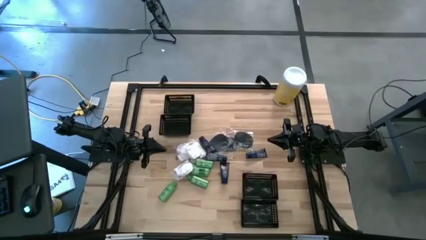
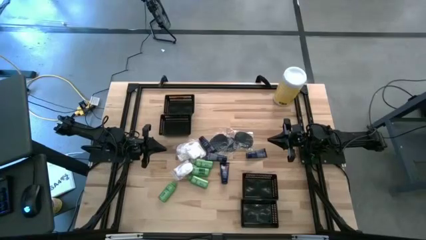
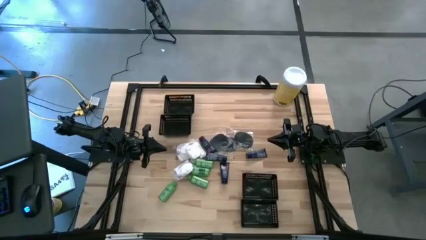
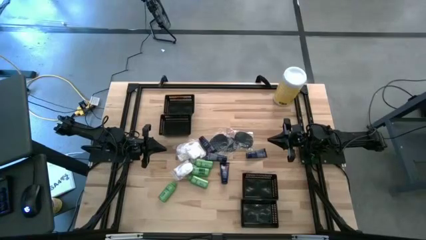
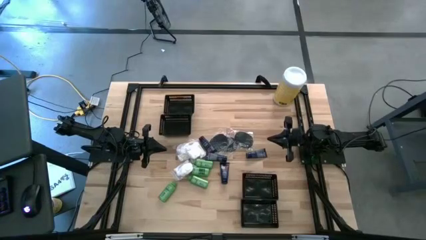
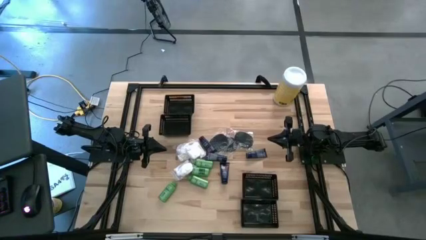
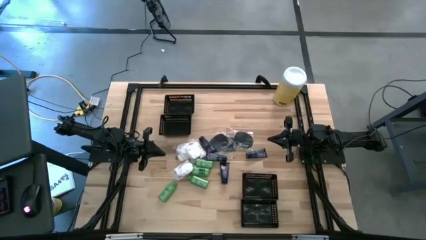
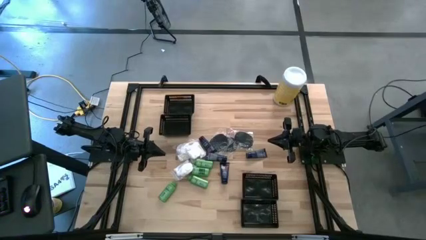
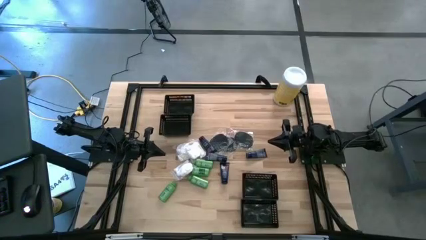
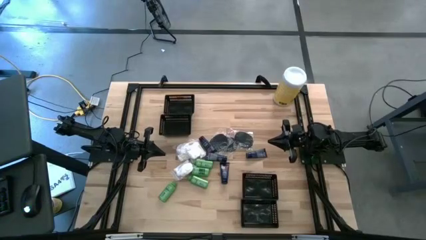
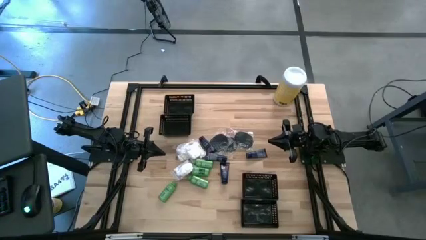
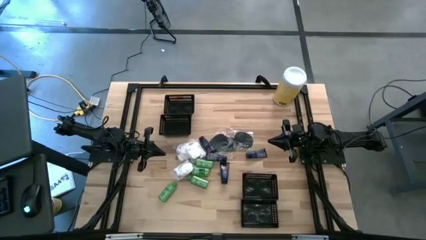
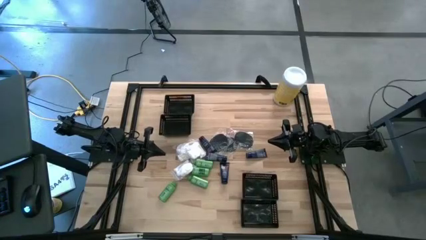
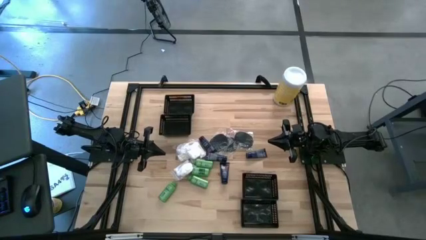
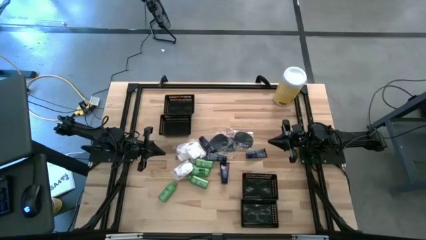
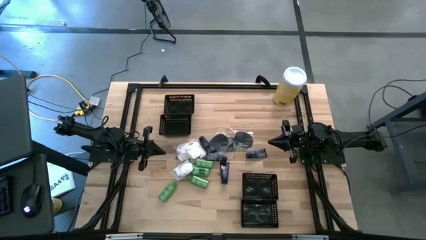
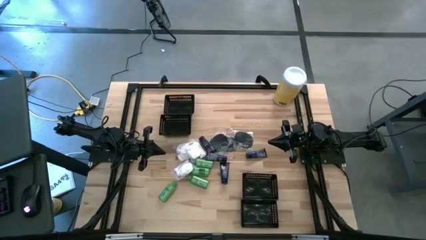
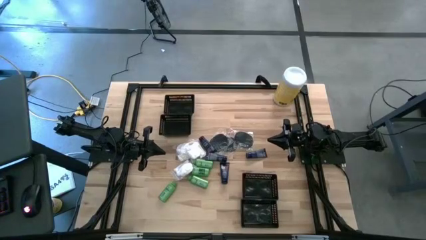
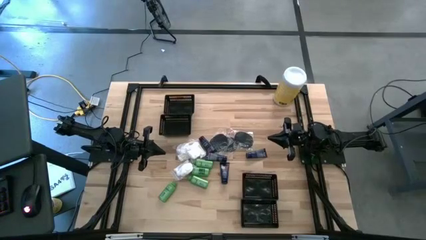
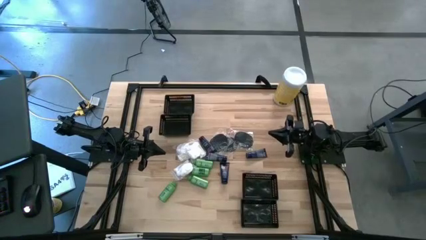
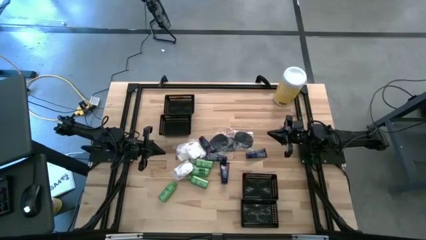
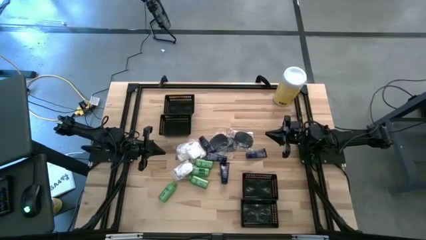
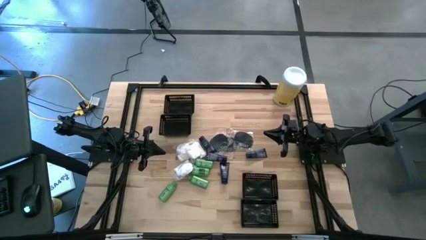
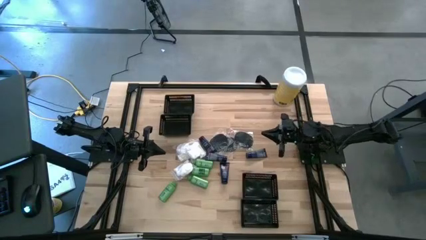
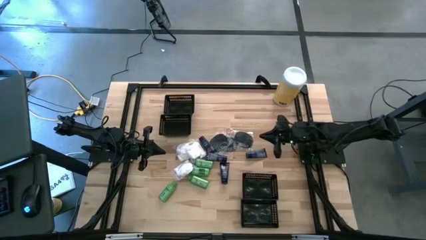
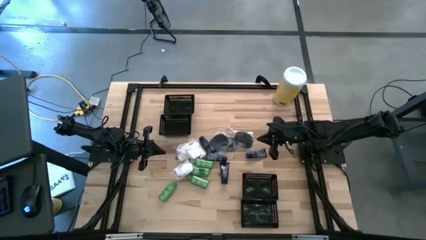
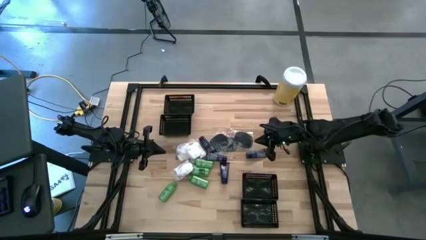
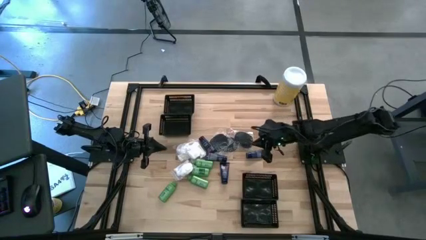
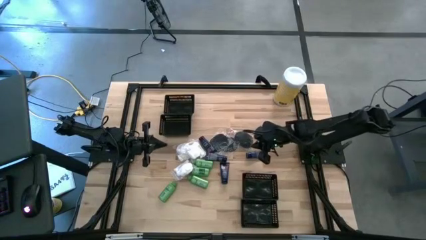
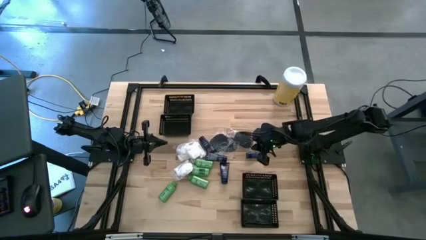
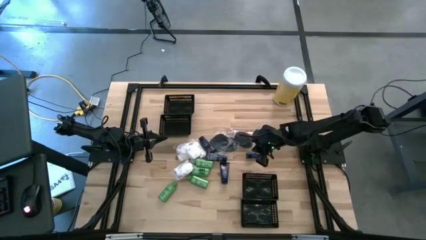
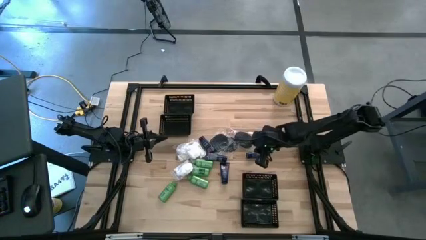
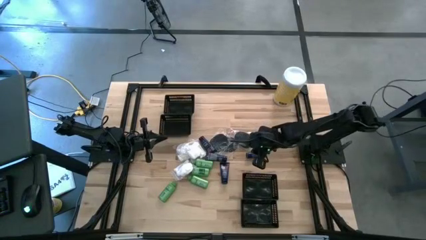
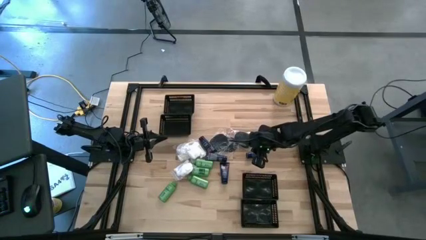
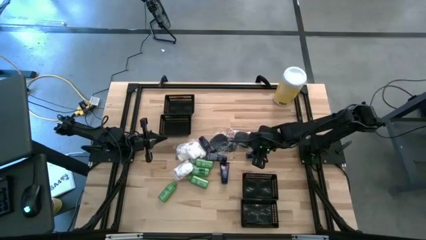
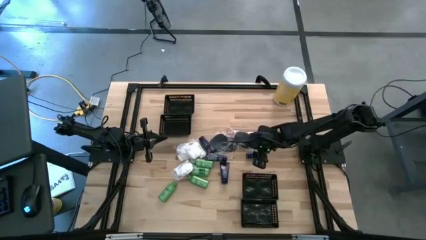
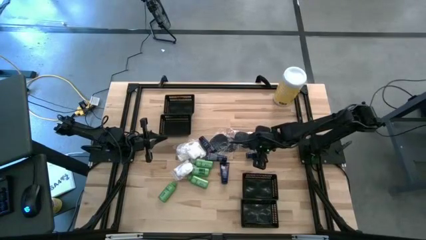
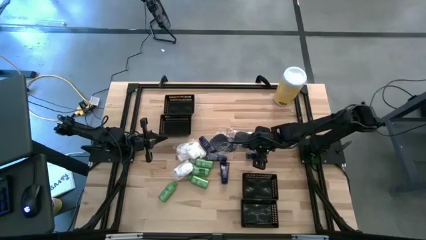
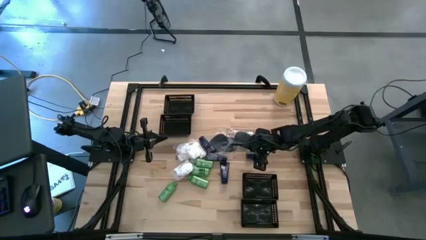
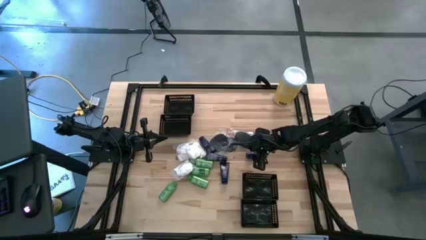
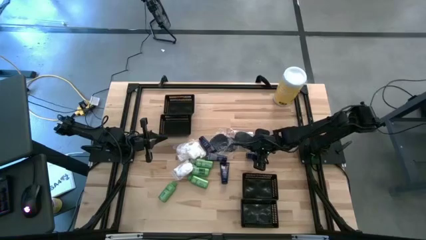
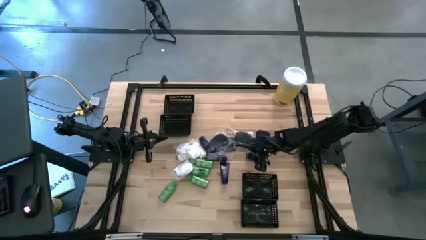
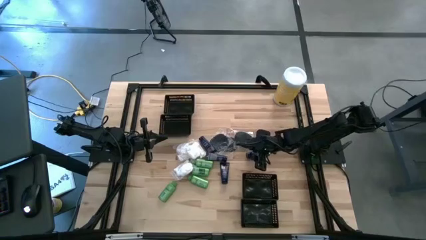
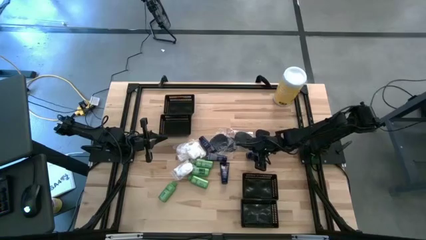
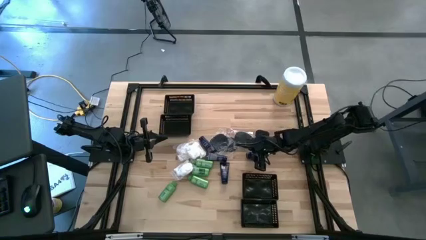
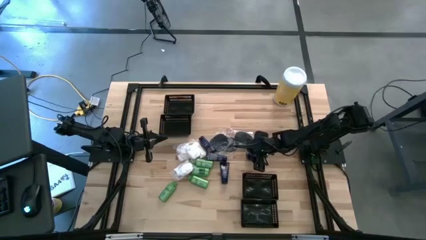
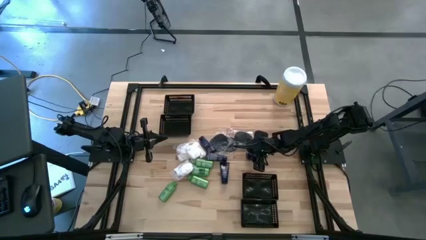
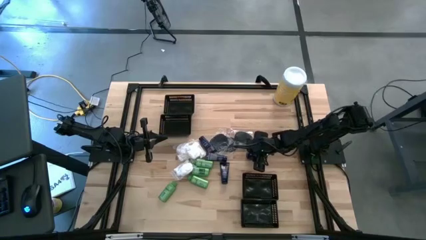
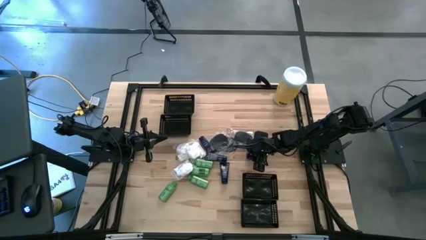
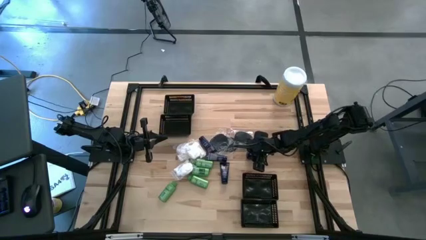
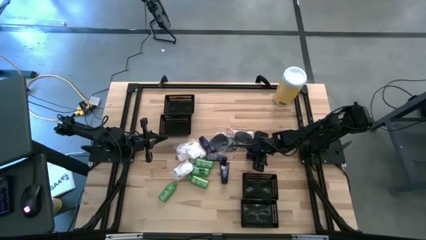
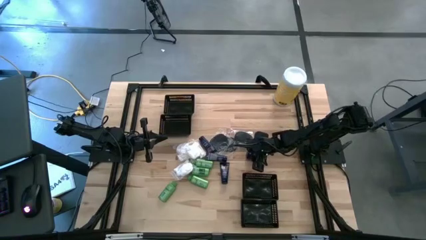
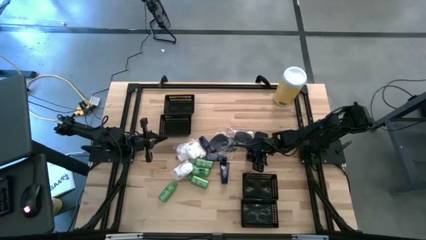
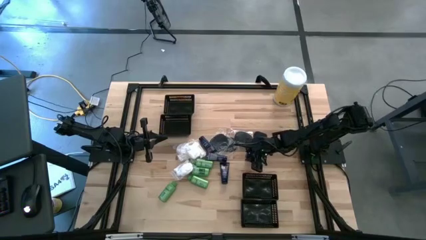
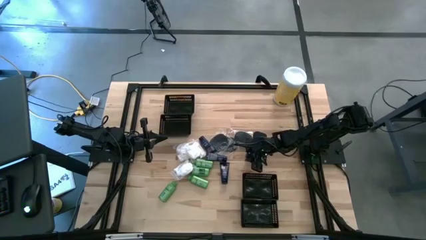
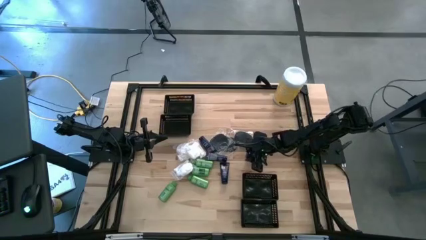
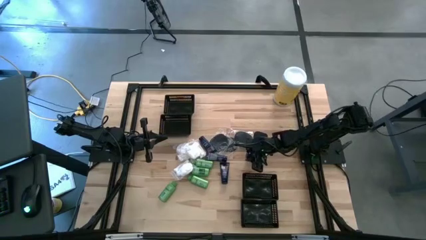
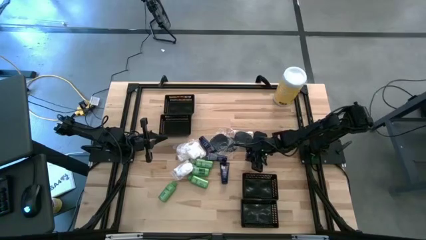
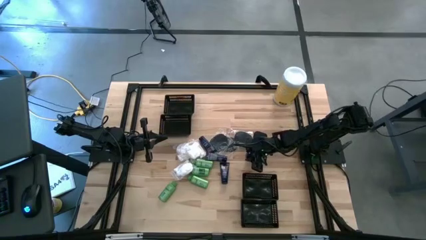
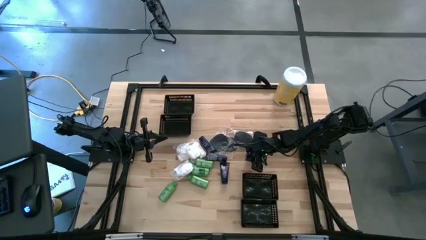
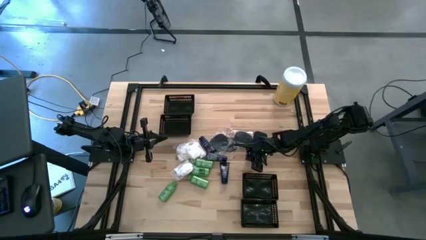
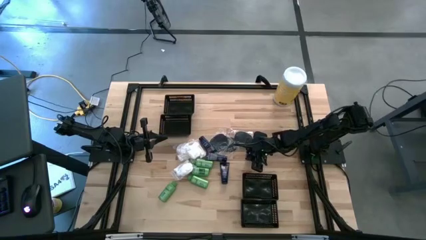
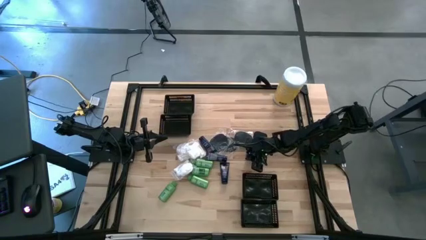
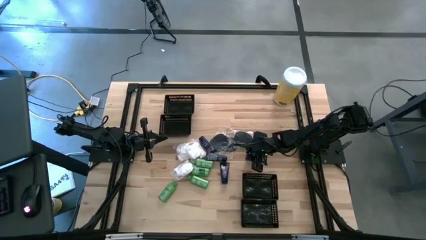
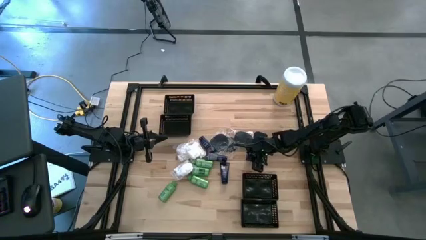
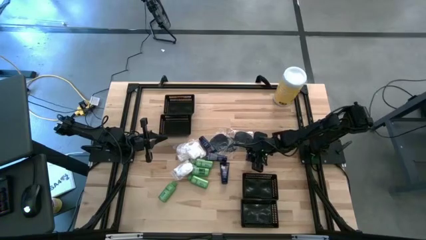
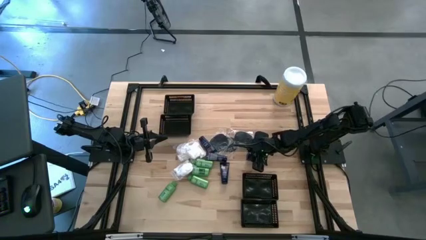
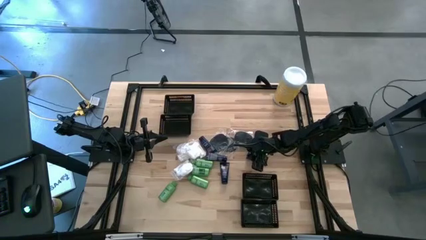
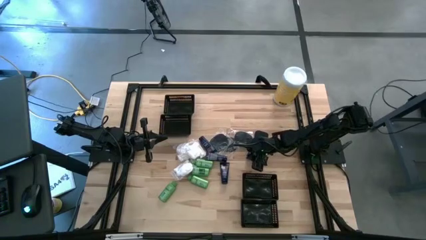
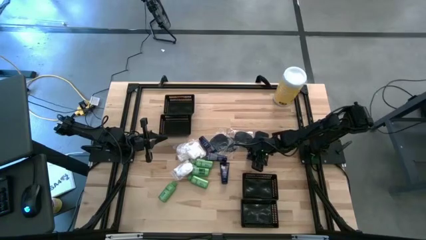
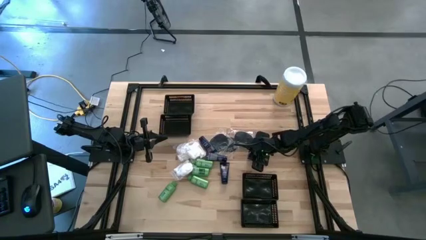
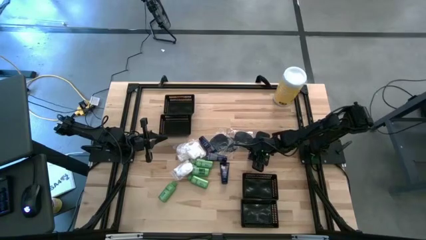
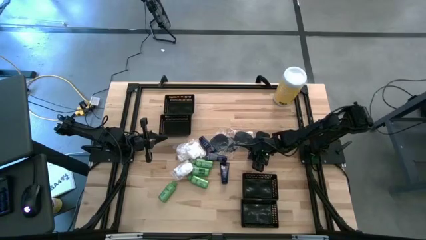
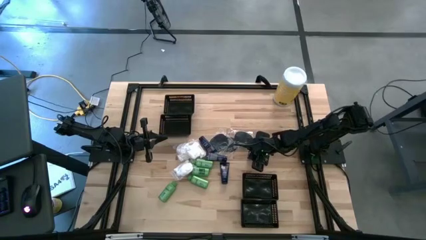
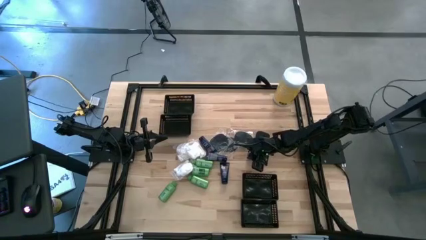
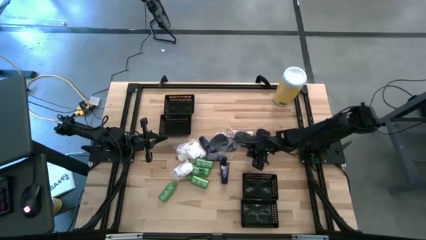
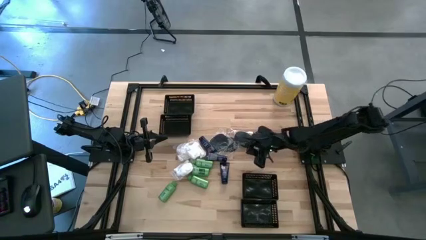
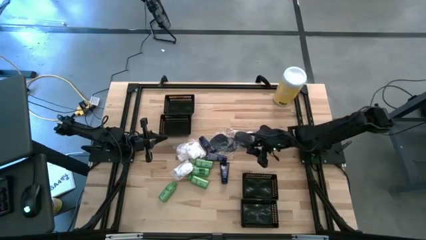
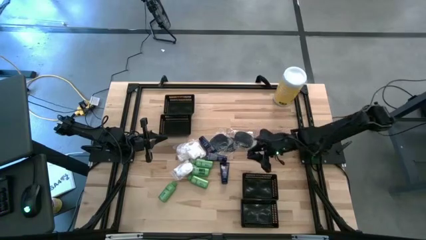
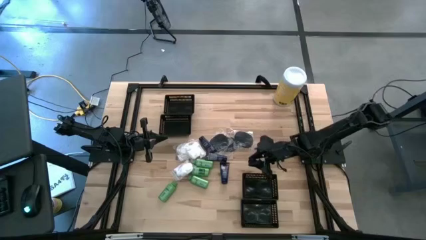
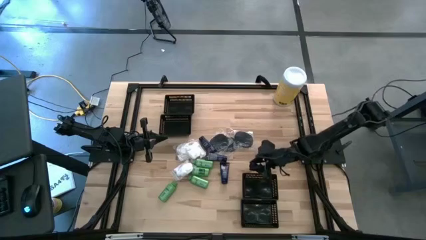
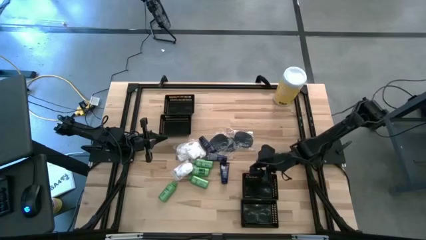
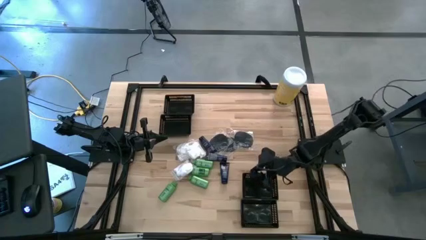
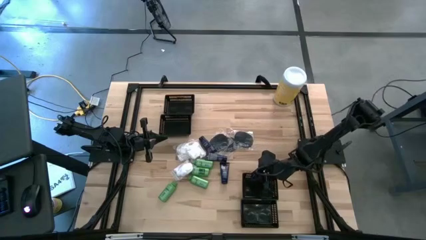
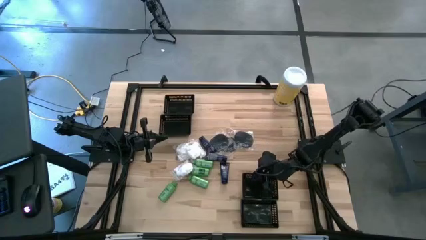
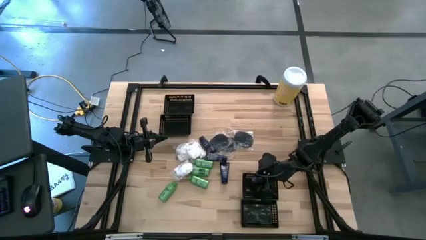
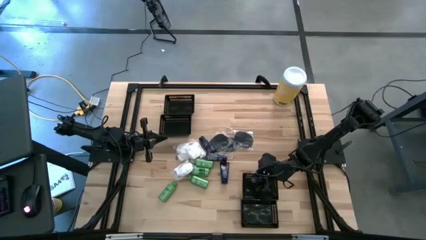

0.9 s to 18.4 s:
Task: Pick & Place Travel size toiletries
Put the blue shave cream into the middle bottom black basket
